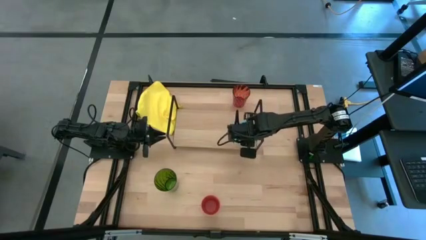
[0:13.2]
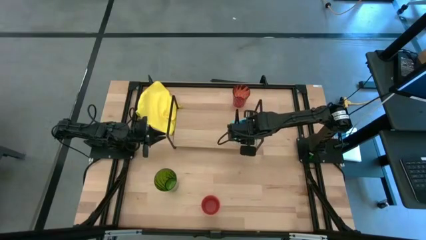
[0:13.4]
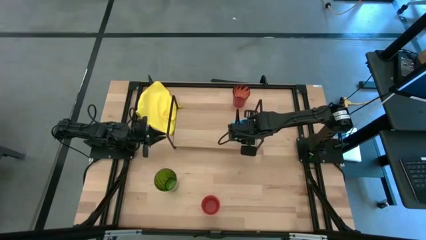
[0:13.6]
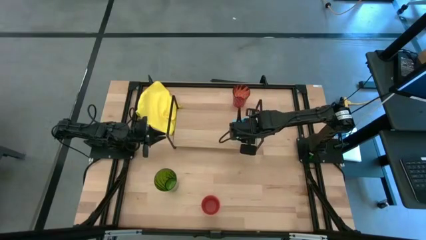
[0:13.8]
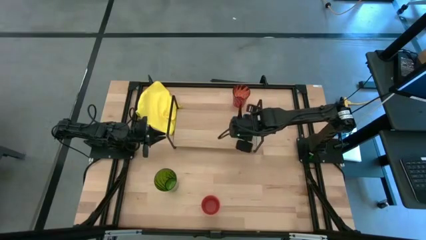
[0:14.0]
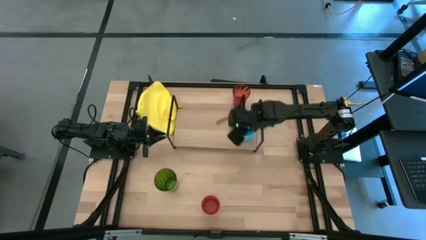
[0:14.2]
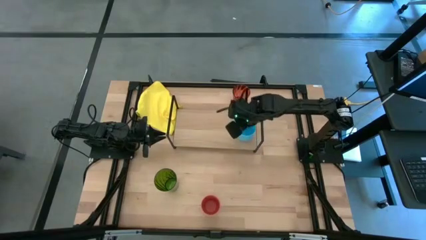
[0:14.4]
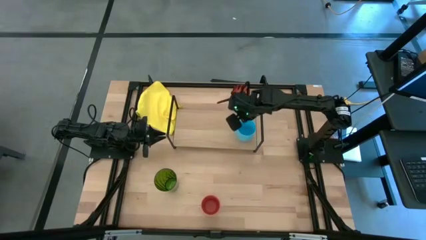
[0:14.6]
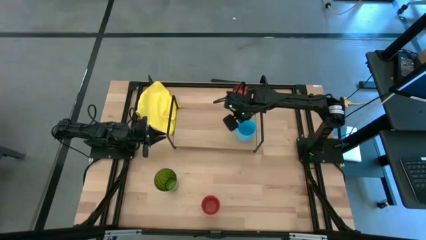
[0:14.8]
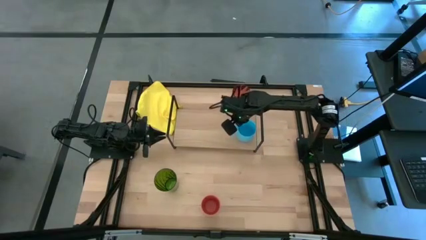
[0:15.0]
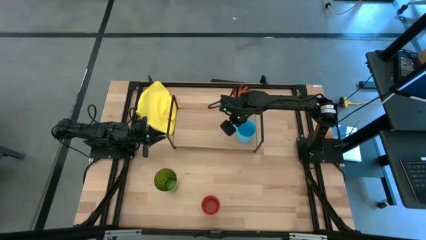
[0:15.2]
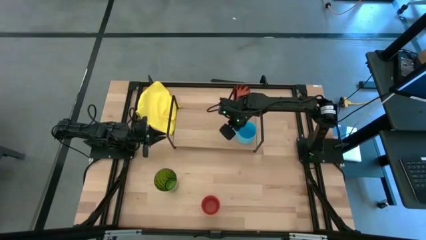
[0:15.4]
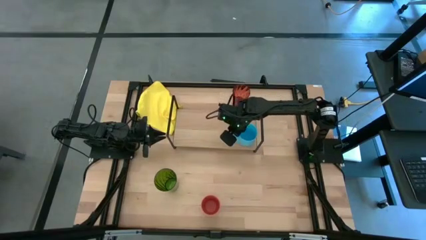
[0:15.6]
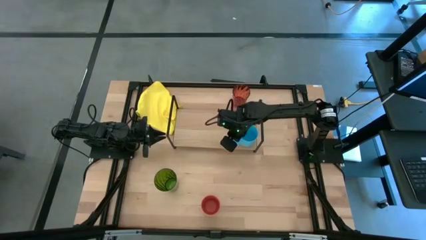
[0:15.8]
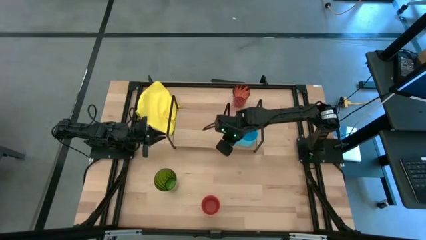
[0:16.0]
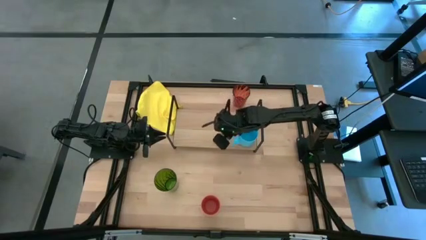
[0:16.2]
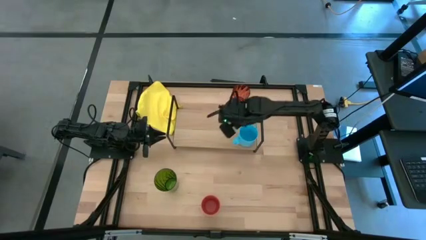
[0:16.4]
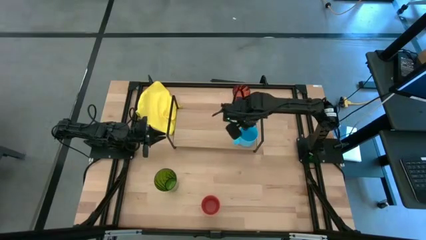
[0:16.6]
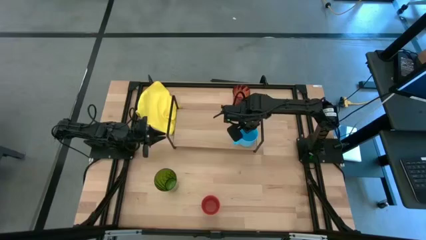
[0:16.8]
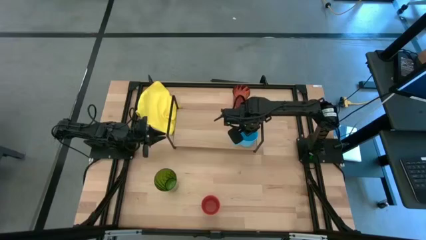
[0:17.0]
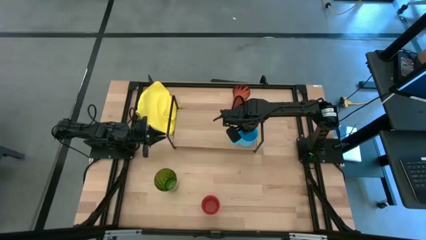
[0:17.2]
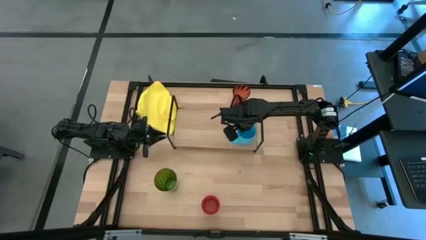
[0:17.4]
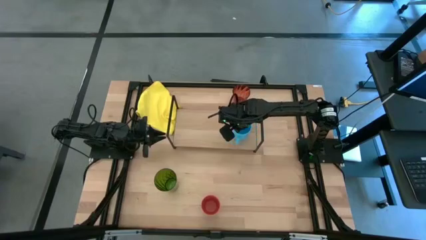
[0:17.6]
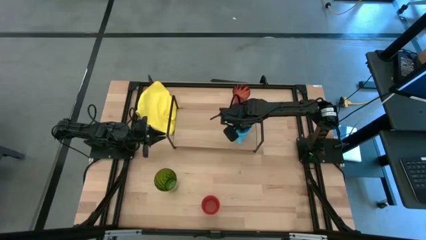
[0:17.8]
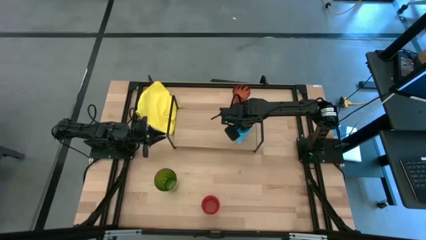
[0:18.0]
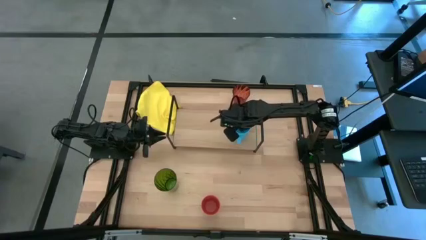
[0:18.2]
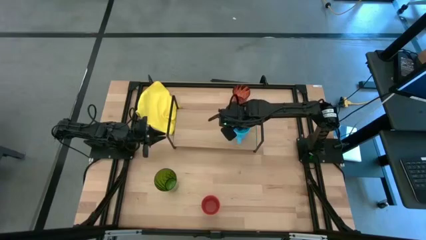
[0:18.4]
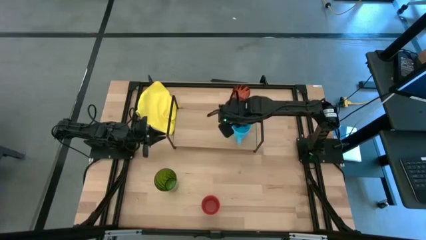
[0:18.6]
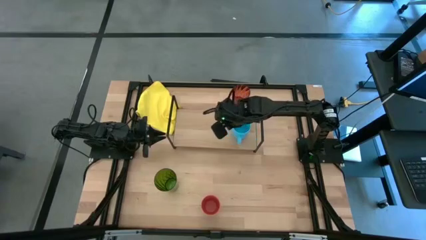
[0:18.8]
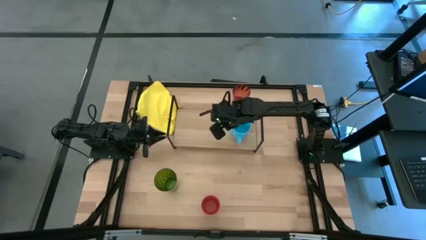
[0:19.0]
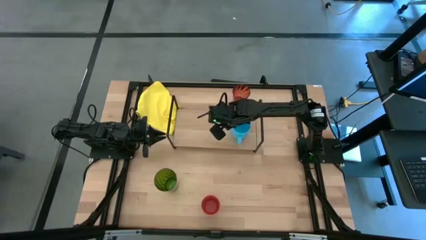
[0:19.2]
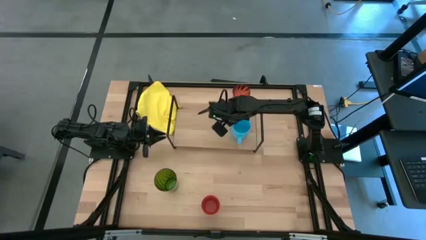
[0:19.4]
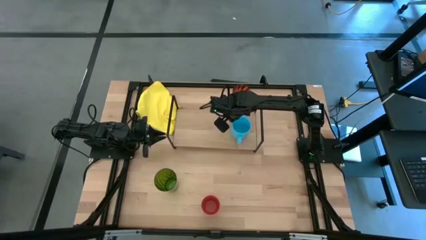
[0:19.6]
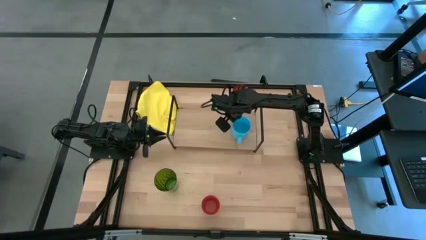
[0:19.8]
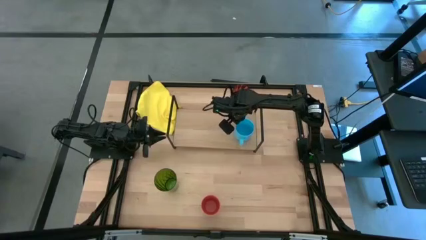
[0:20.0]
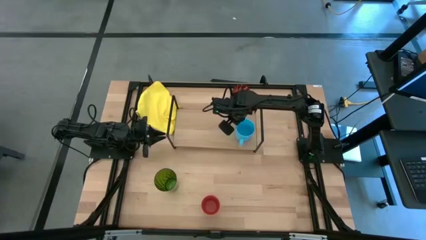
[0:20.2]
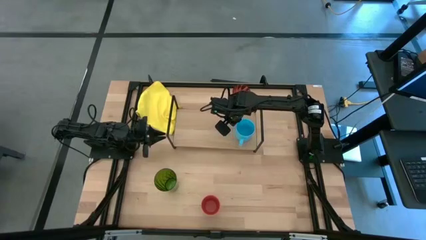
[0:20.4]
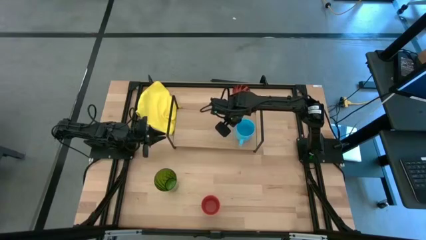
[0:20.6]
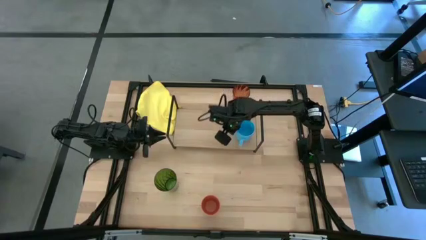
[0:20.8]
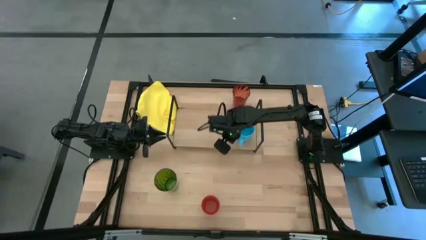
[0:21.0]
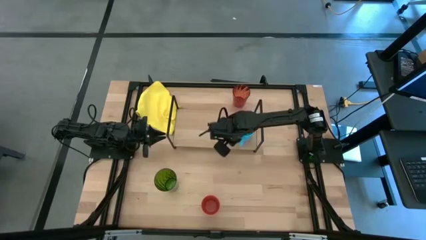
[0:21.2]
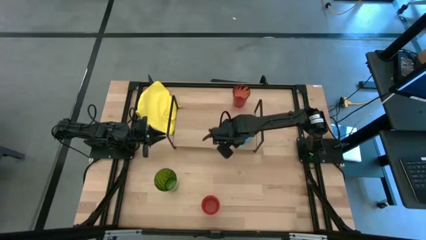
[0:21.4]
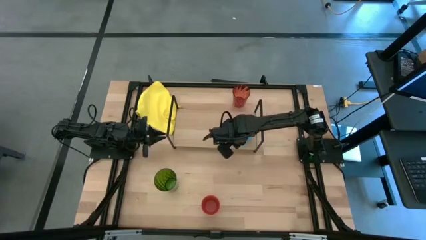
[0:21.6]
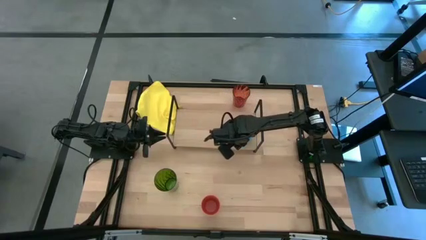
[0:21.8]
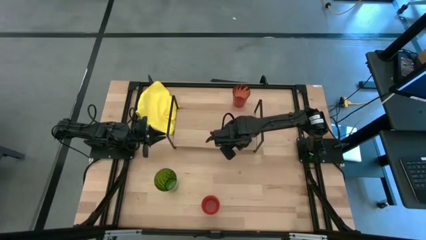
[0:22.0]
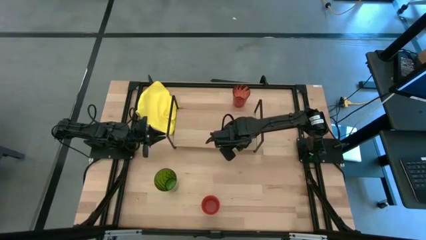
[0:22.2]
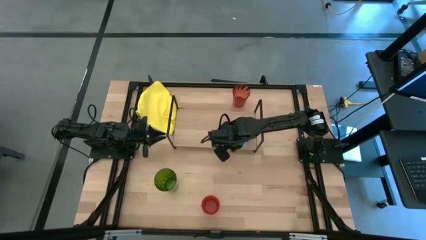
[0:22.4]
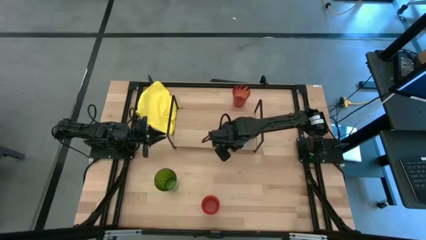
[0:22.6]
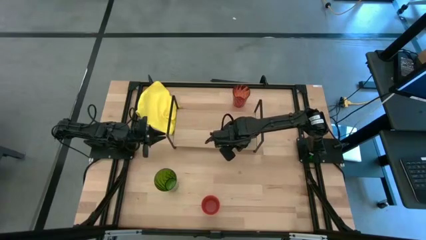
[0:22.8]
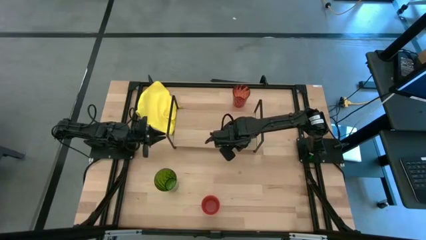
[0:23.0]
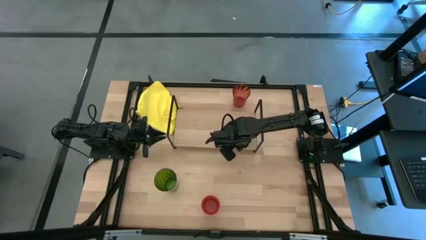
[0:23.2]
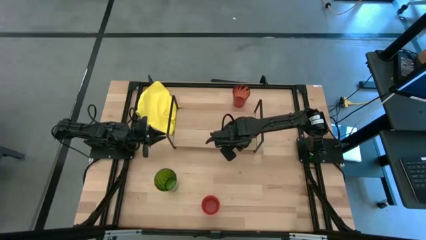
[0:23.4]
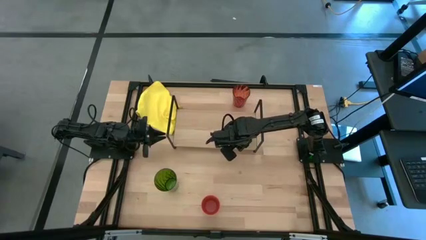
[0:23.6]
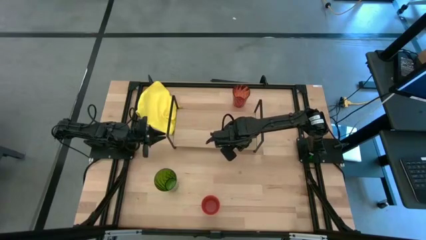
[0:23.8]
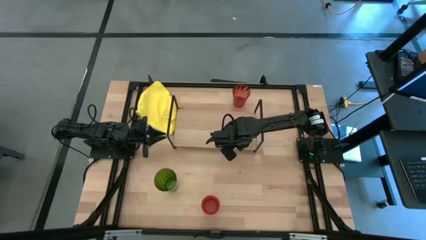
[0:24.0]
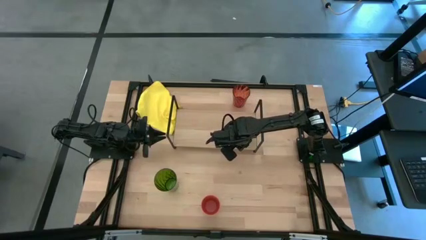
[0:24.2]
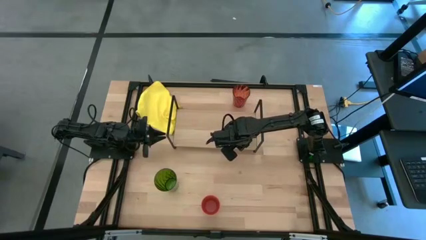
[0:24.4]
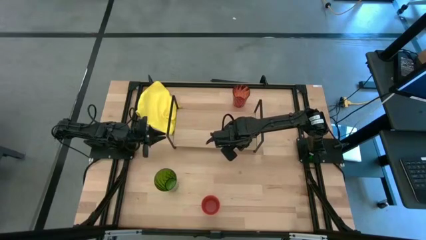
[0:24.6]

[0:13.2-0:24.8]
Task: Stack small to large cups/mugs on shelf
Put the blue mug on the shelf

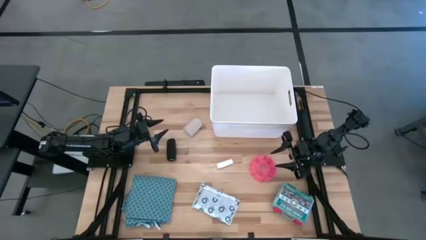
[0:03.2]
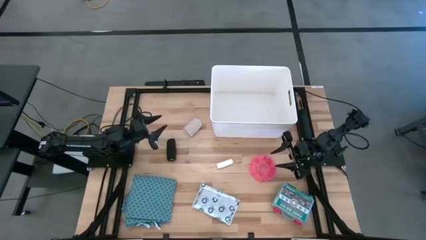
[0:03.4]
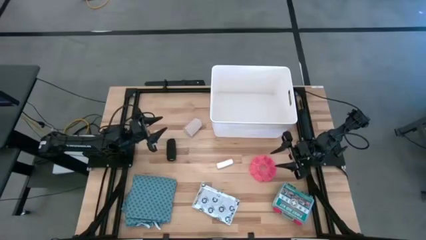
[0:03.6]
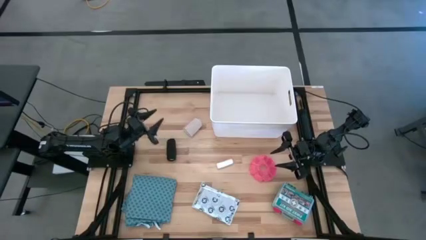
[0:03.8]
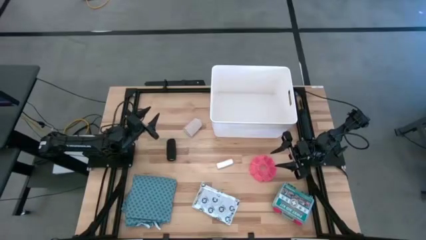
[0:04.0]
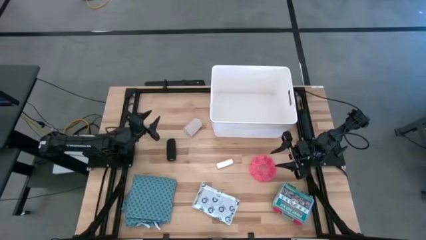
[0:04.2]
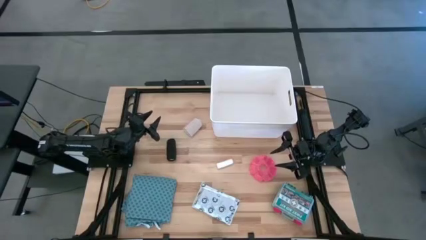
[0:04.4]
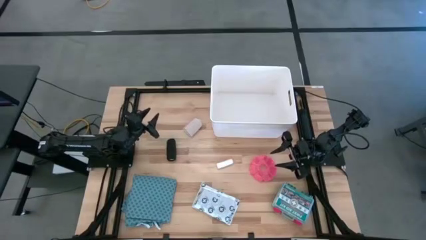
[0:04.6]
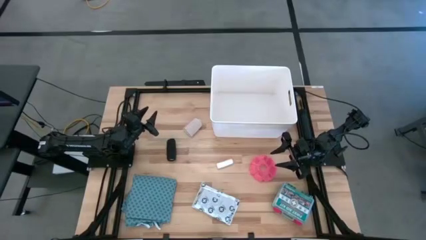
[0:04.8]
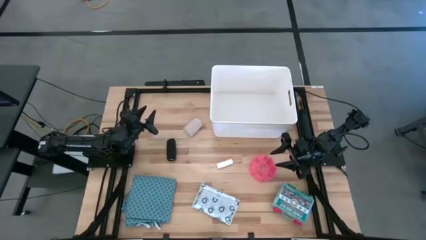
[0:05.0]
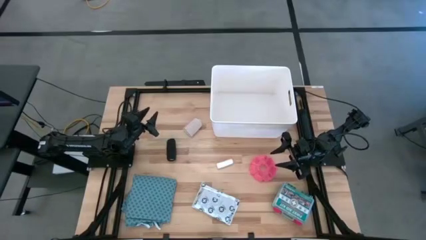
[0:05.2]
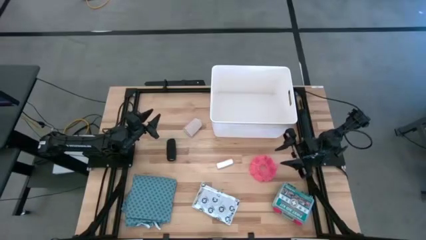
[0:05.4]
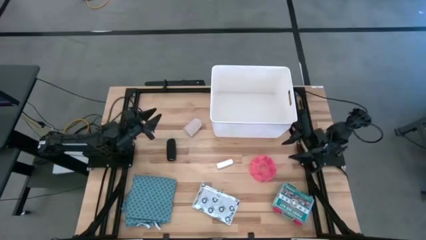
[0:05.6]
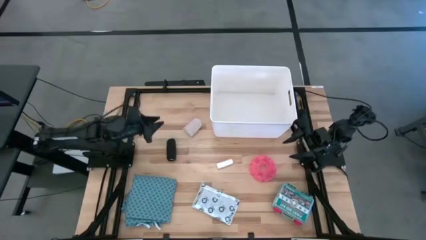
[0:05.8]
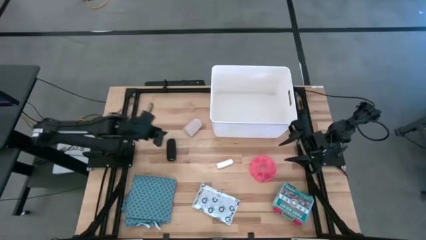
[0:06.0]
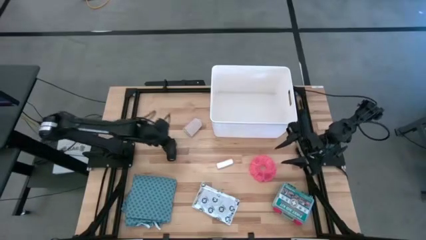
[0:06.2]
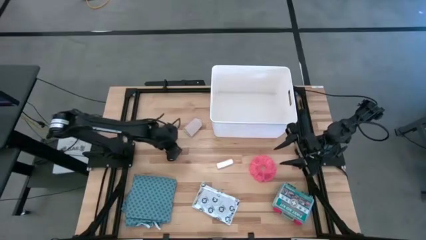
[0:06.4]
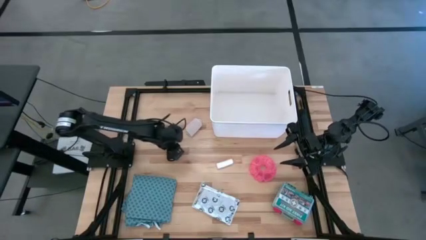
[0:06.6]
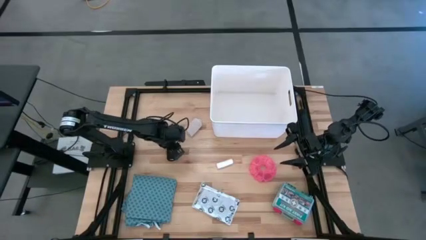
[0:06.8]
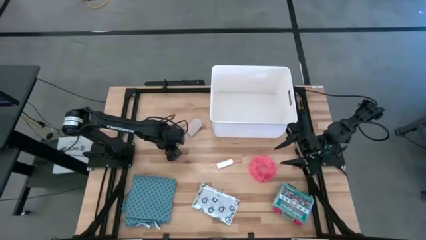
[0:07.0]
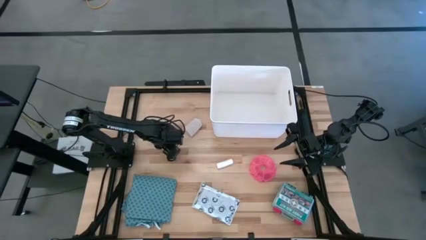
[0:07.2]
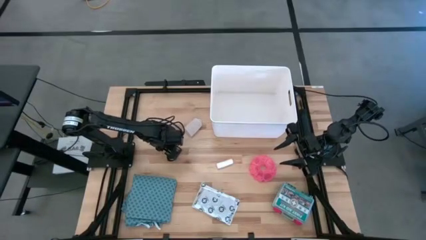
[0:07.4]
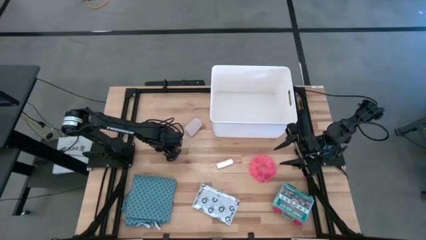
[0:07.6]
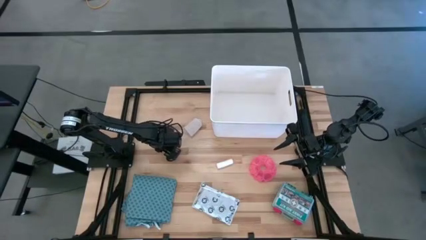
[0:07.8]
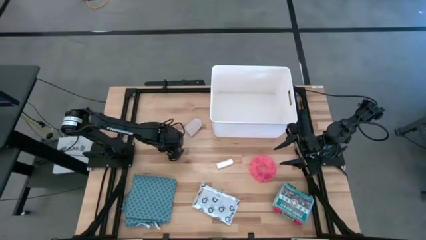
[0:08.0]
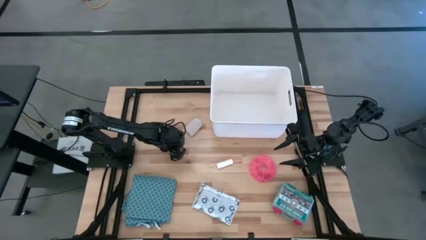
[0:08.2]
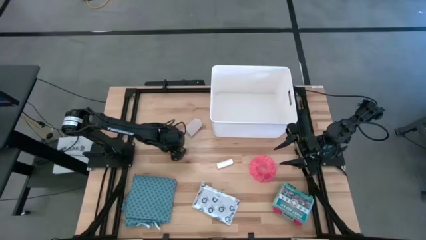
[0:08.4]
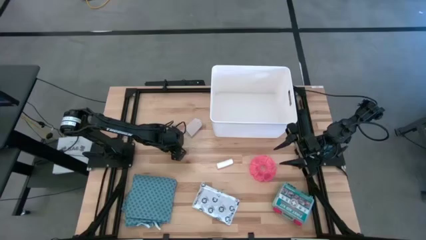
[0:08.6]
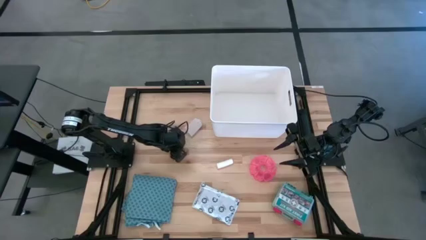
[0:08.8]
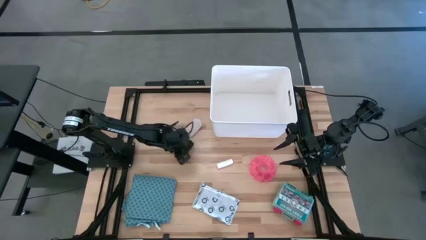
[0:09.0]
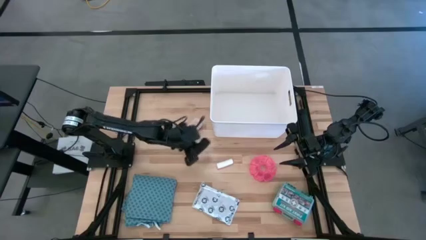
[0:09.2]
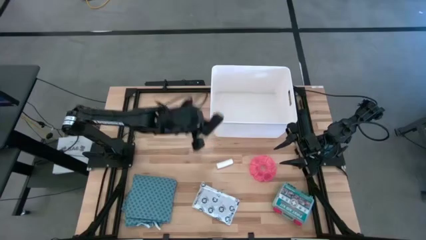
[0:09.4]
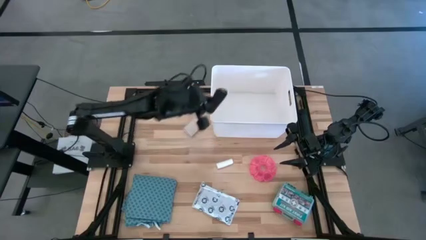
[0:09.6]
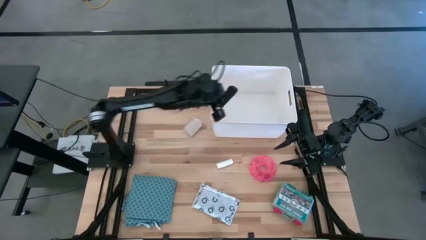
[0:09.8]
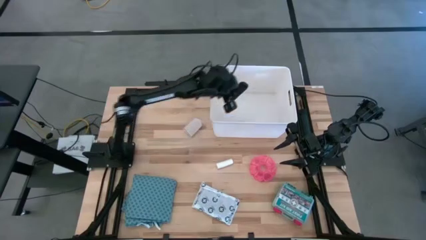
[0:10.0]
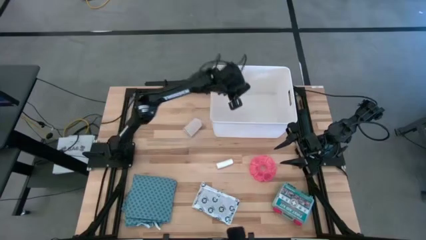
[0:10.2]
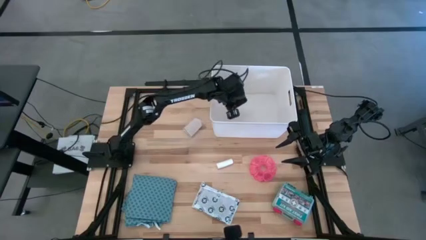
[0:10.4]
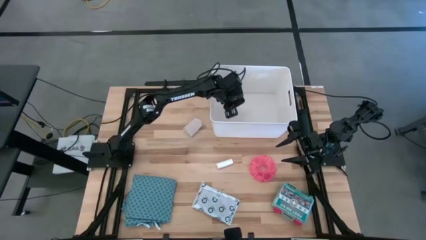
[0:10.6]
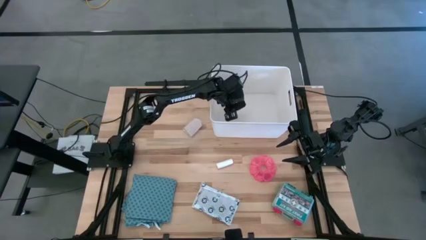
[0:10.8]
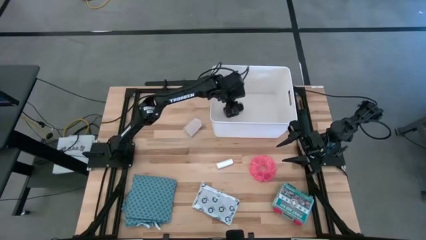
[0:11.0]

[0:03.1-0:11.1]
Task: Pick & place medical supplies in basket/bin
Put the black bandage in the white bin
